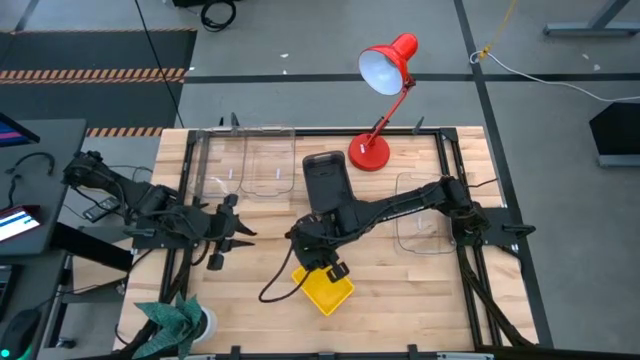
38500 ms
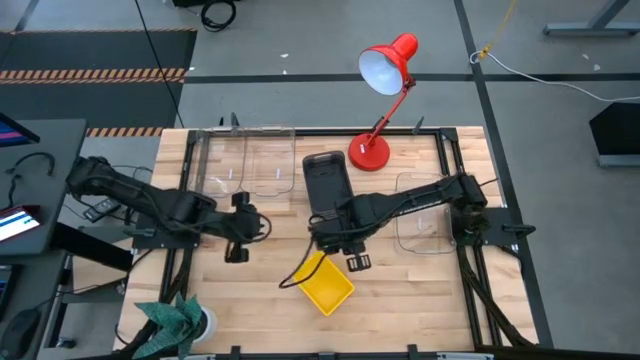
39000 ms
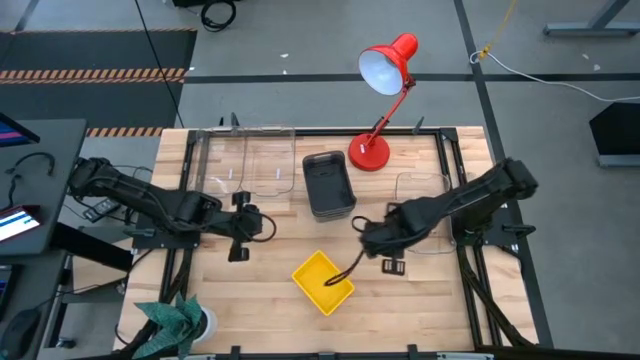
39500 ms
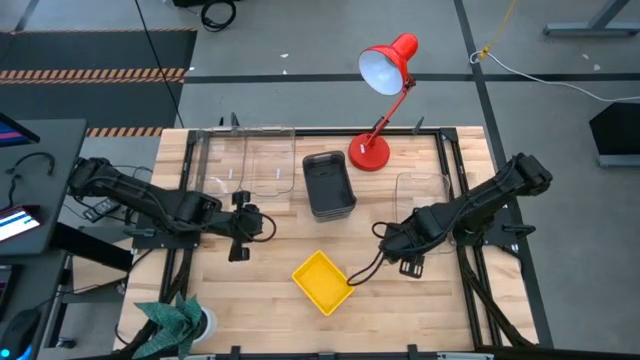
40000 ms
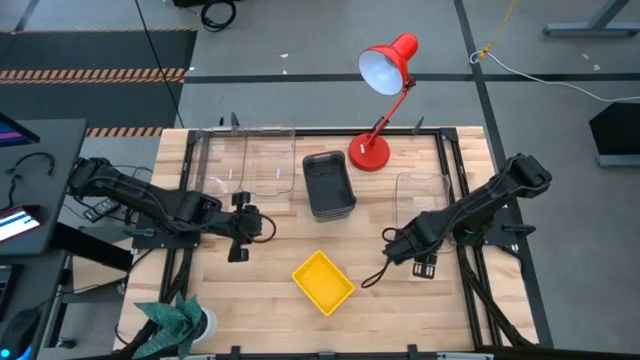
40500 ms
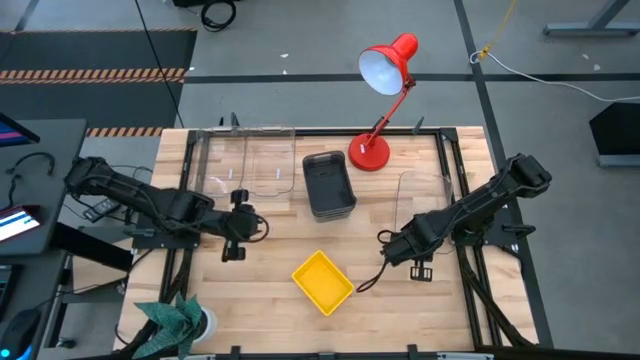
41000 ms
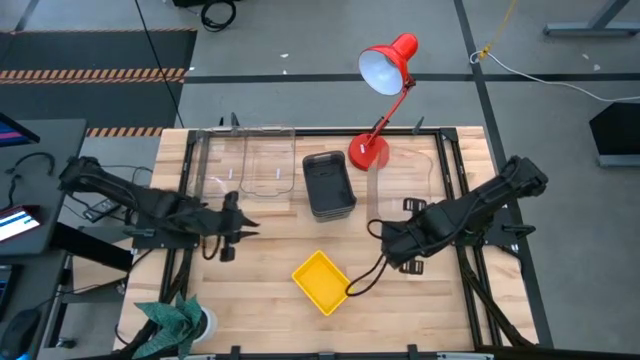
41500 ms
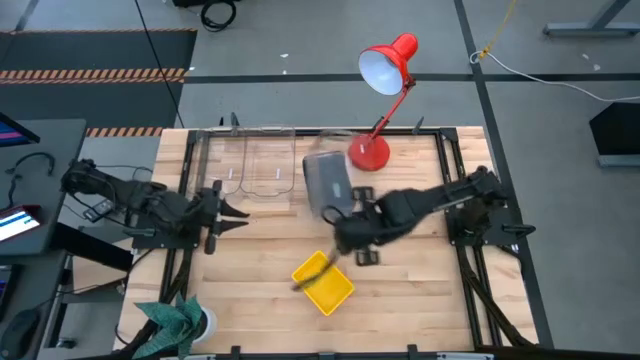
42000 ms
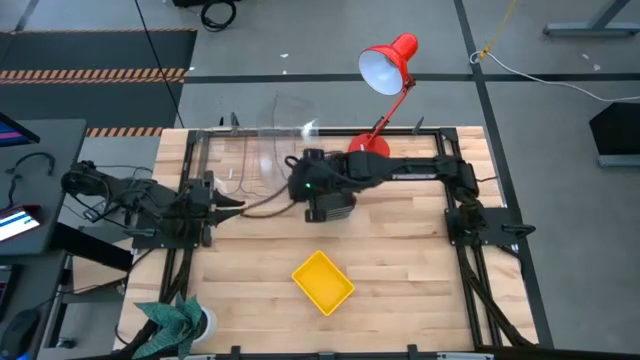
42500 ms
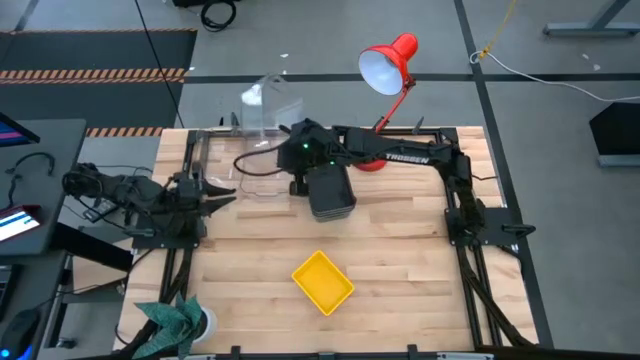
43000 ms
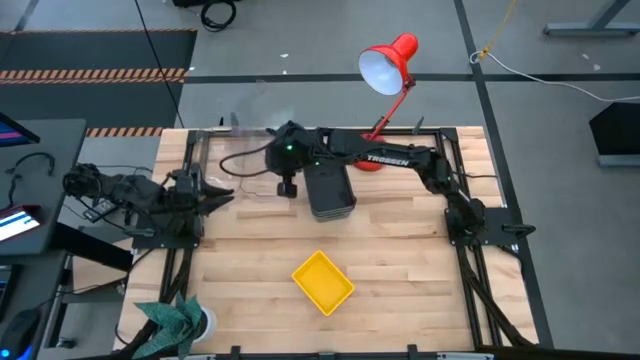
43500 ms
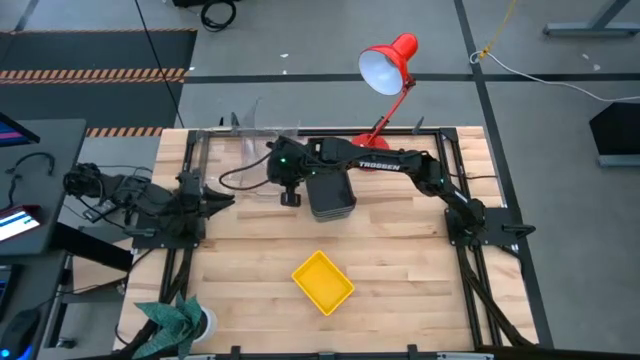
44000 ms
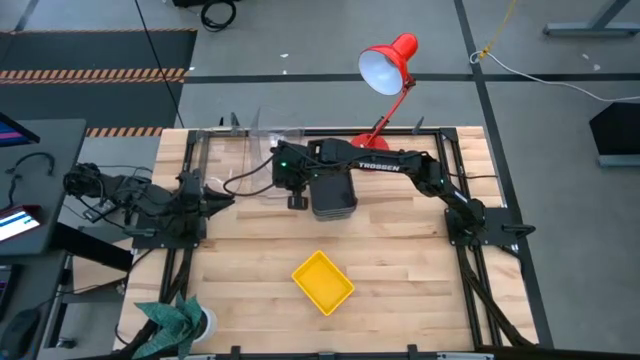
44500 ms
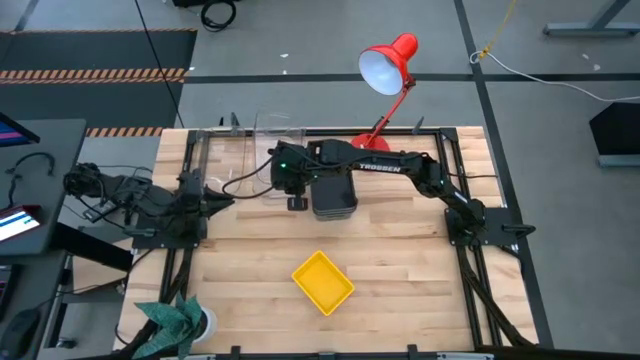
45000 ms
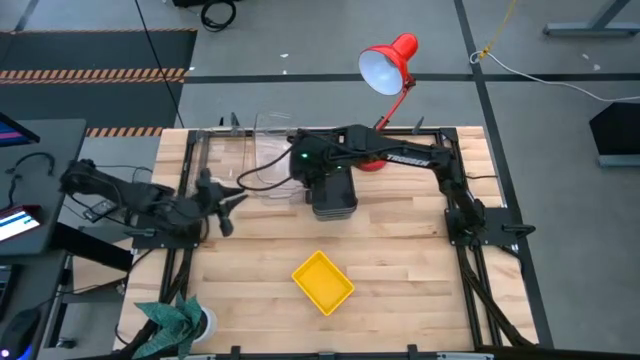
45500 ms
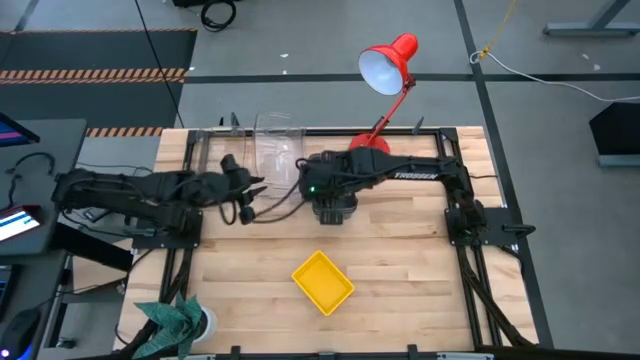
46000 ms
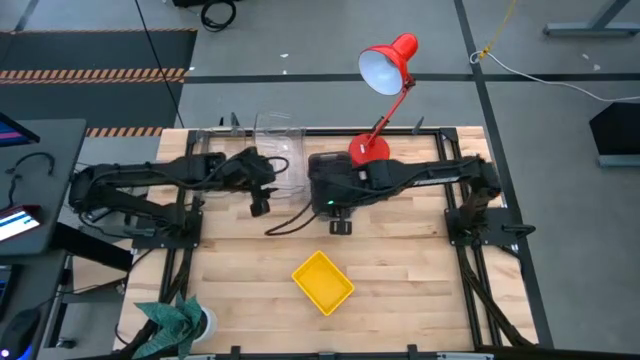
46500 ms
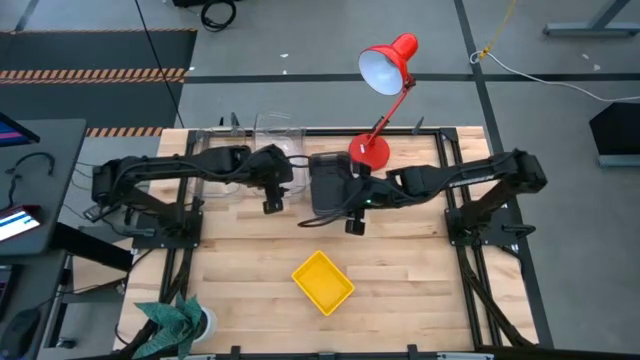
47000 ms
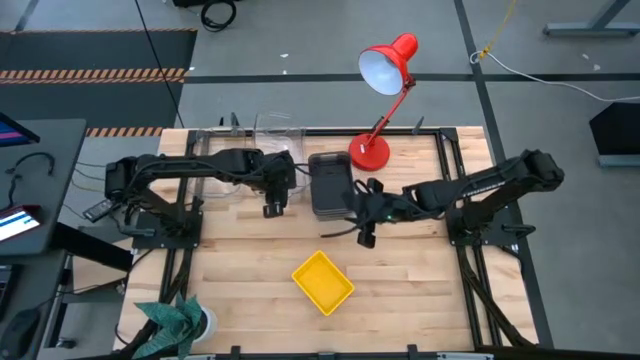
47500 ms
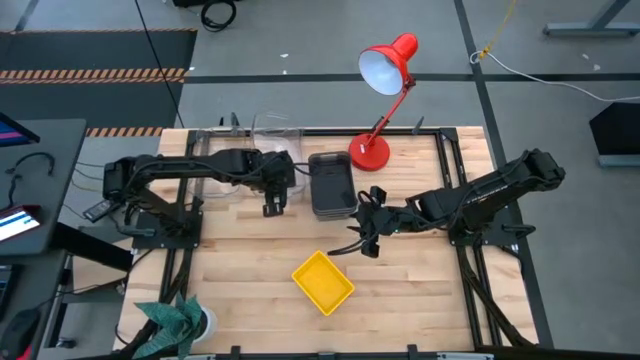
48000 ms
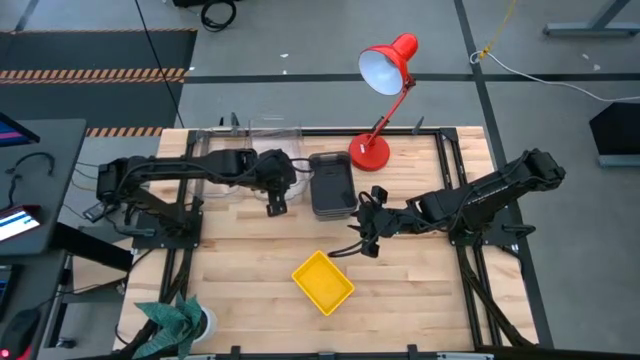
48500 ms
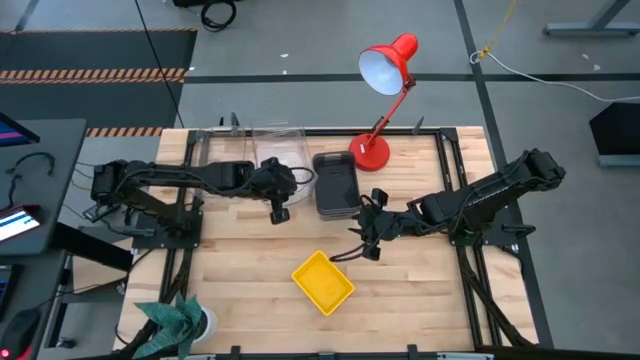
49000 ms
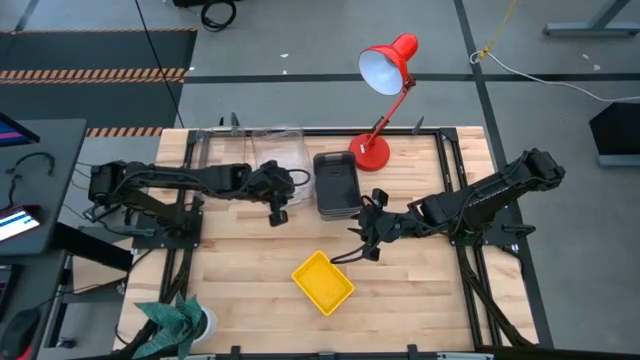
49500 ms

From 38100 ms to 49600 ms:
Stack the right transparent bin on the middle transparent bin

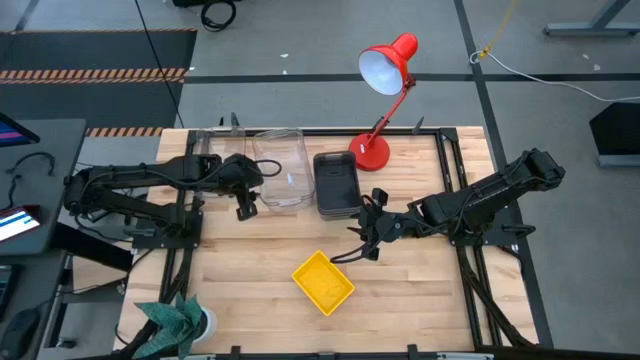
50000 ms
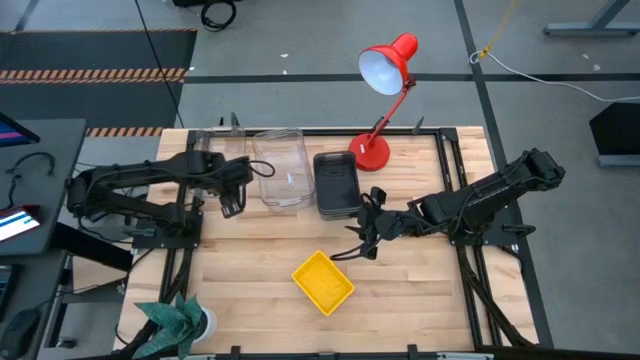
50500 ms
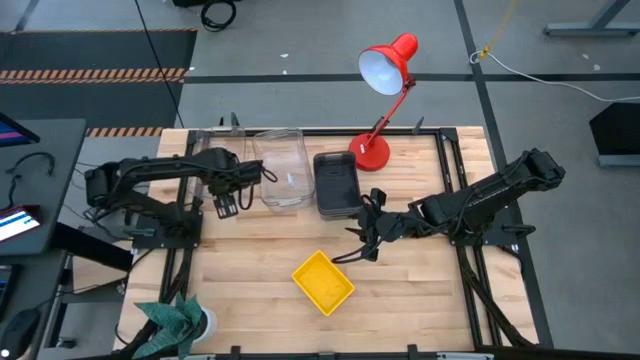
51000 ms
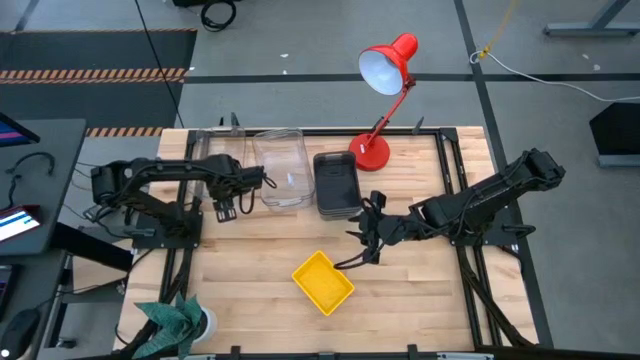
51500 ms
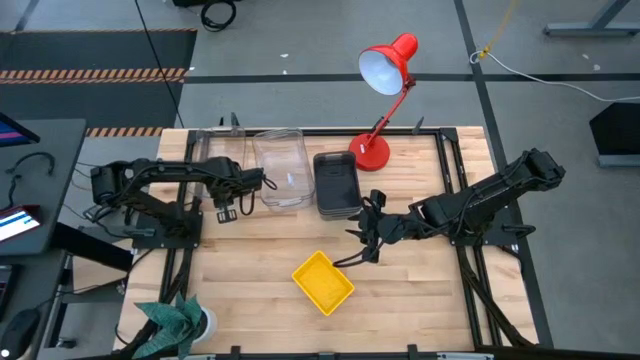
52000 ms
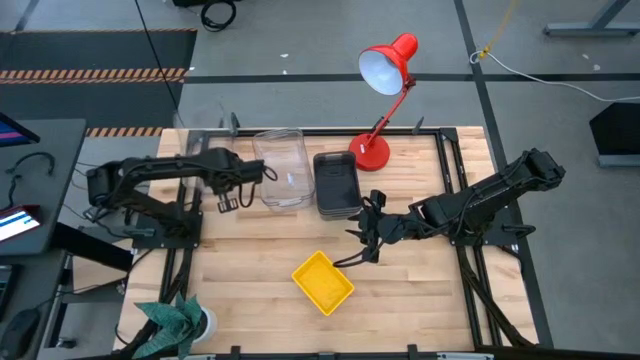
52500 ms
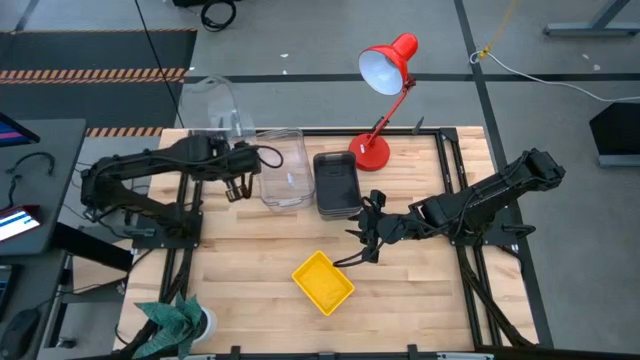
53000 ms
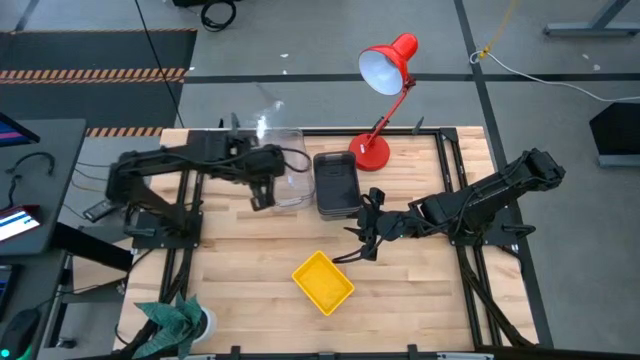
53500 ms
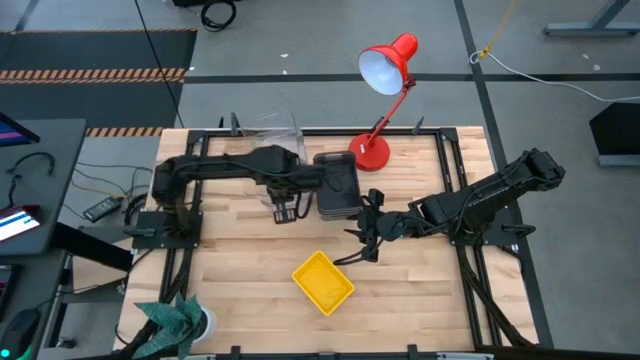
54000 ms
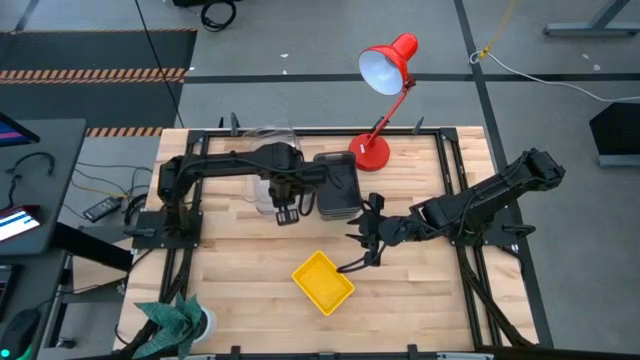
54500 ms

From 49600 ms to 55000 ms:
Stack the left transparent bin on the stacked transparent bins

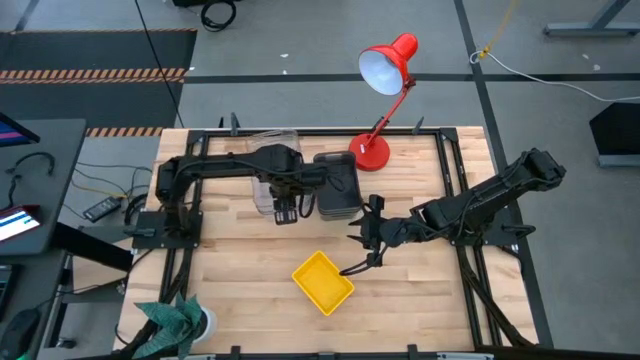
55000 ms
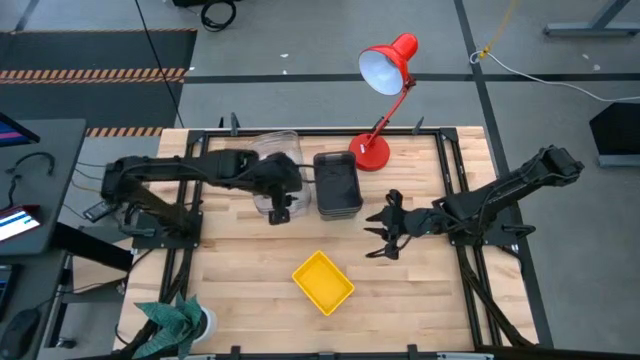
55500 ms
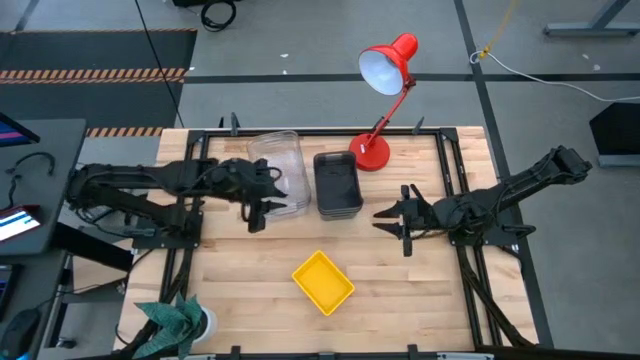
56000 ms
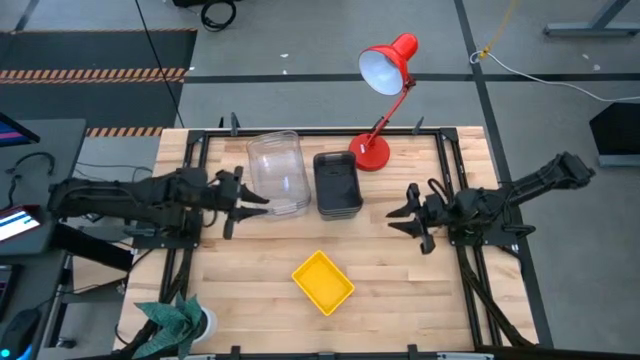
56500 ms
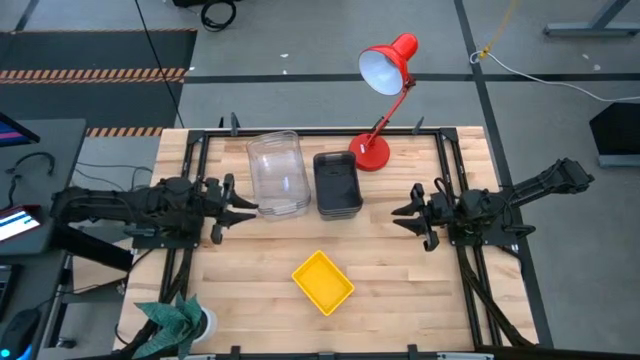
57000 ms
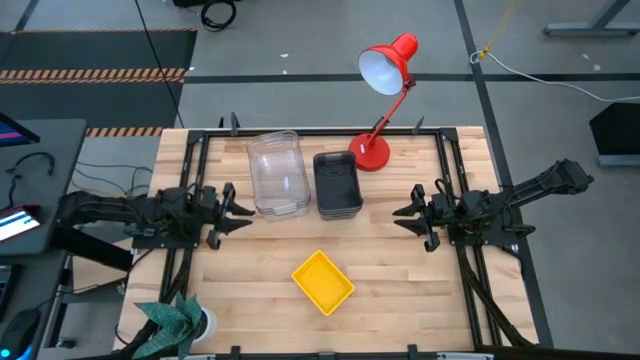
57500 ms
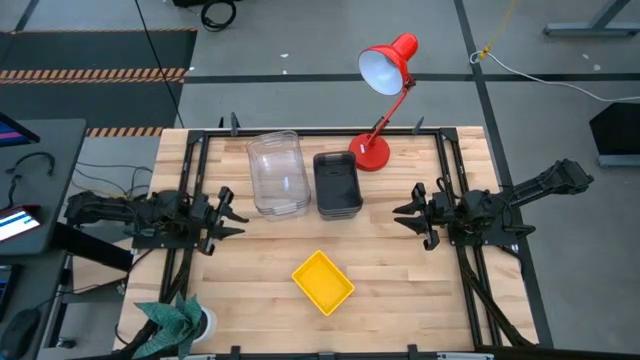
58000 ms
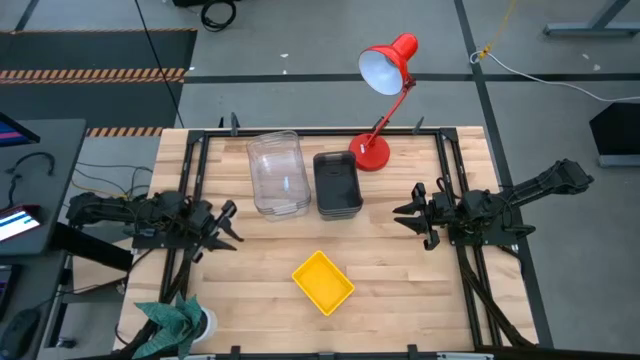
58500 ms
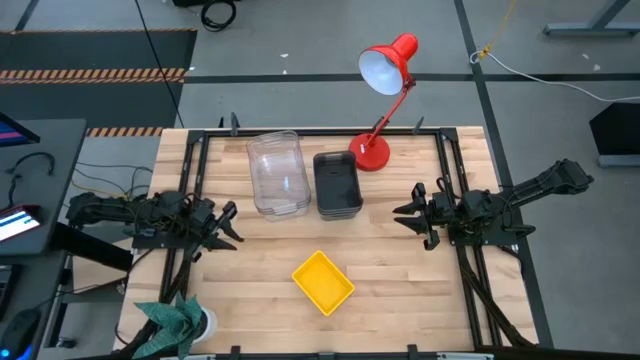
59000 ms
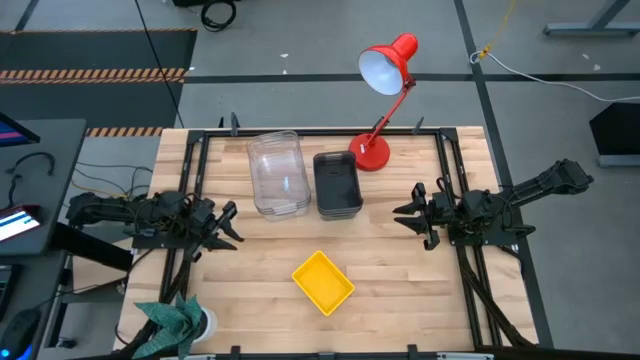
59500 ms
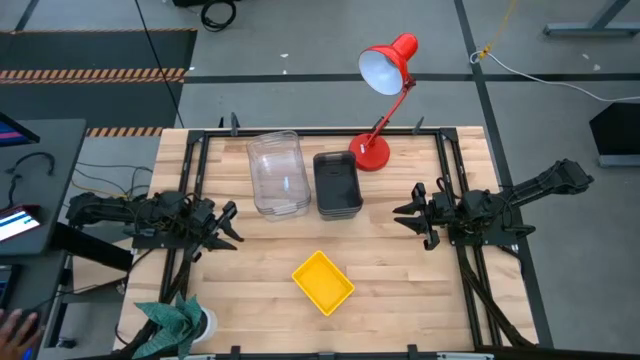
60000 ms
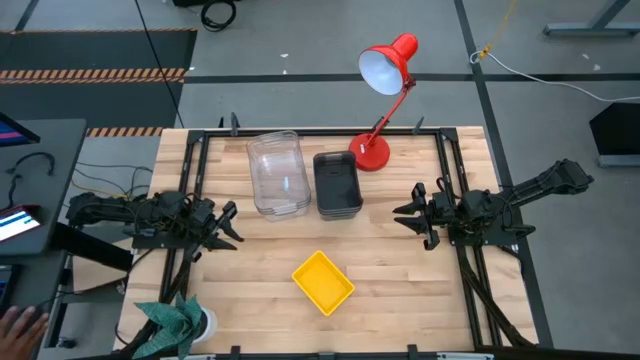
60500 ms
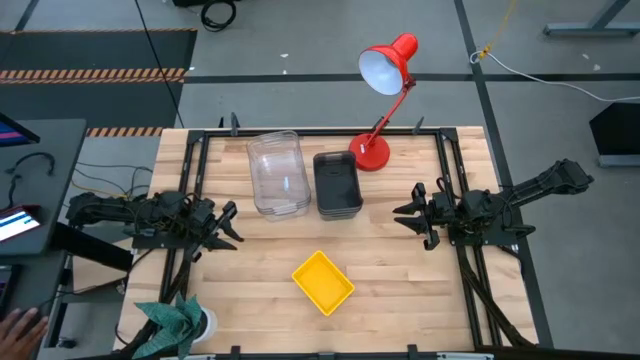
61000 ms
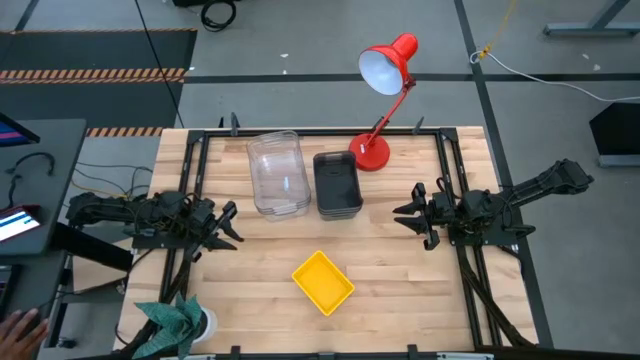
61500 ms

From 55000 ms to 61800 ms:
Return to Home Position
